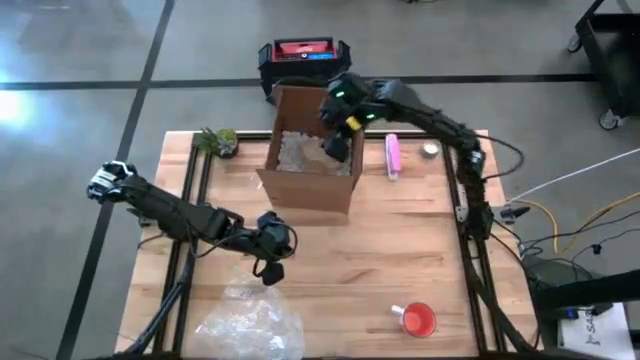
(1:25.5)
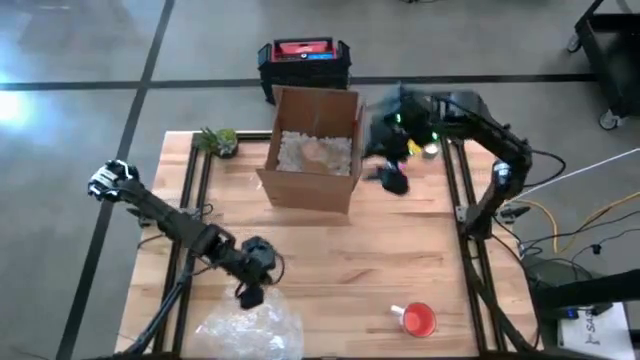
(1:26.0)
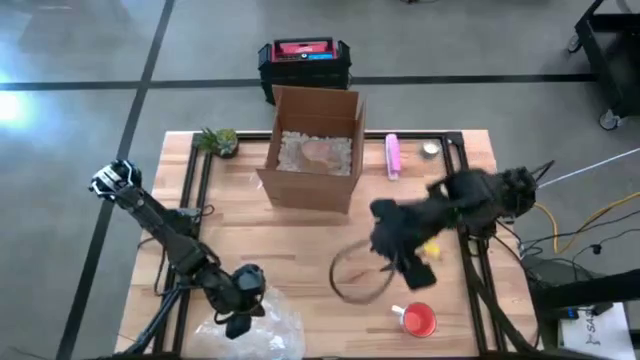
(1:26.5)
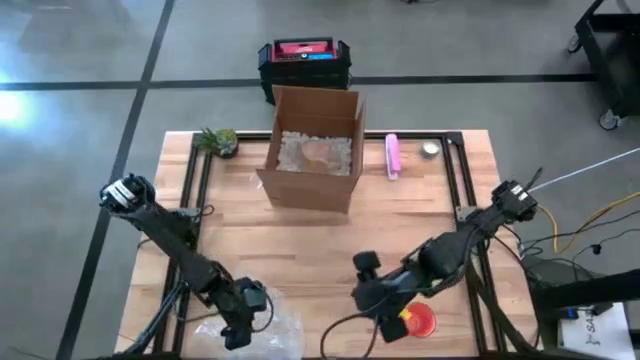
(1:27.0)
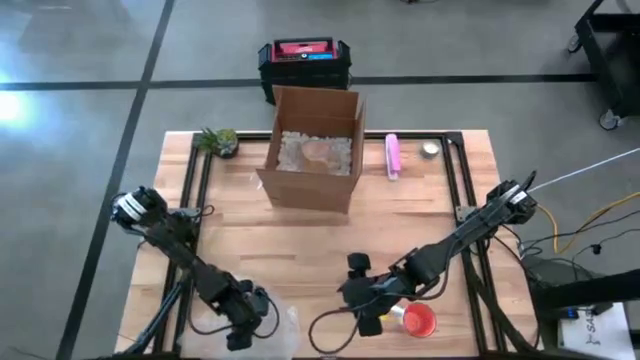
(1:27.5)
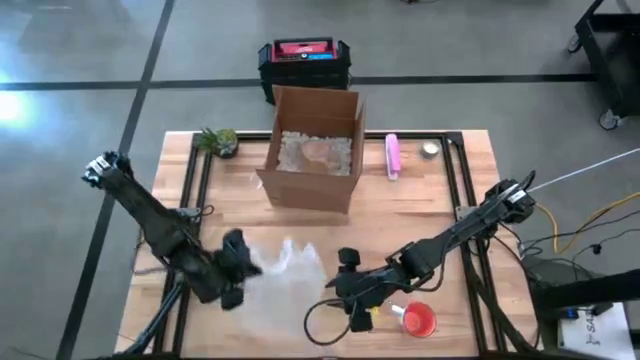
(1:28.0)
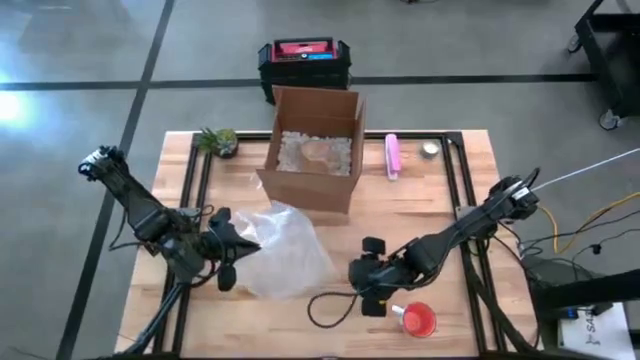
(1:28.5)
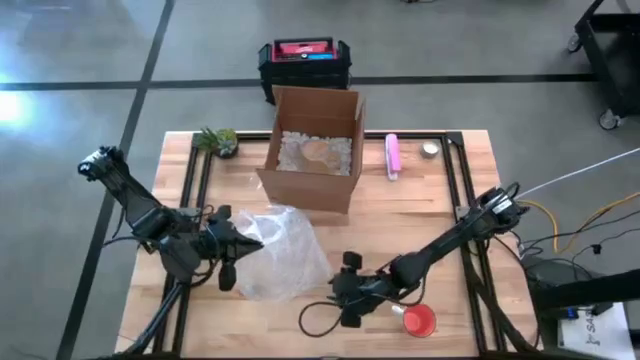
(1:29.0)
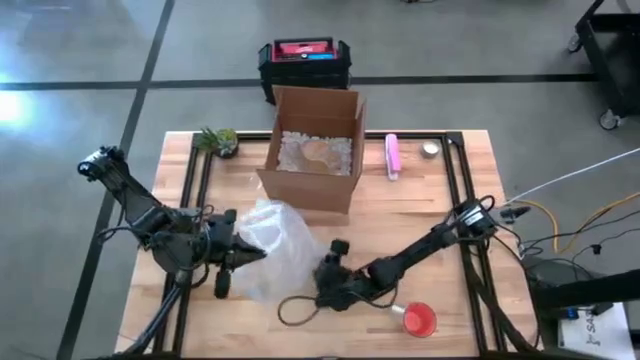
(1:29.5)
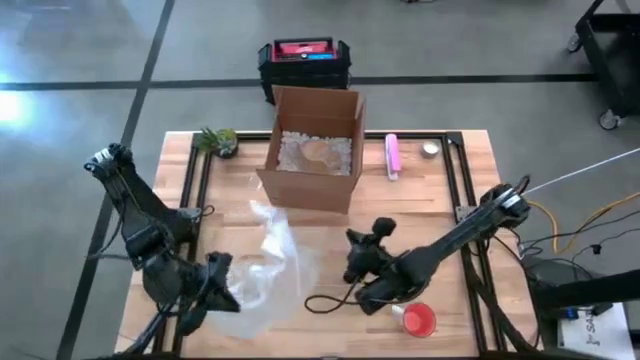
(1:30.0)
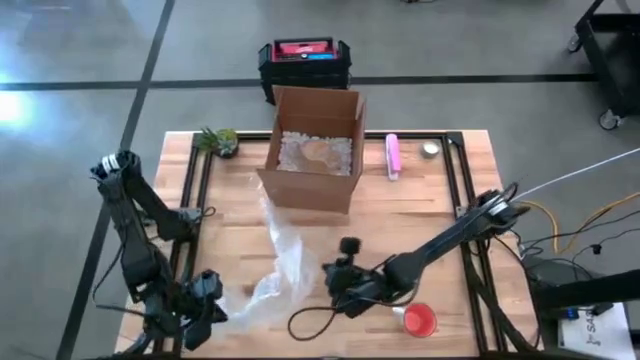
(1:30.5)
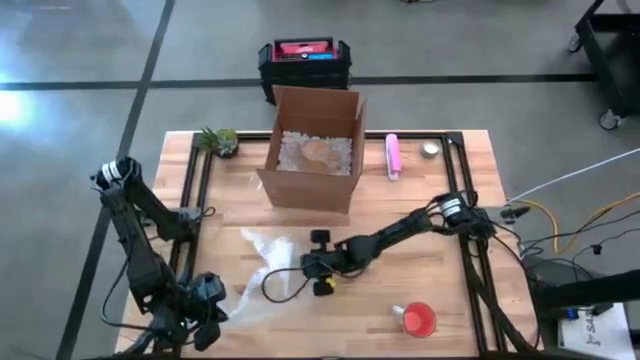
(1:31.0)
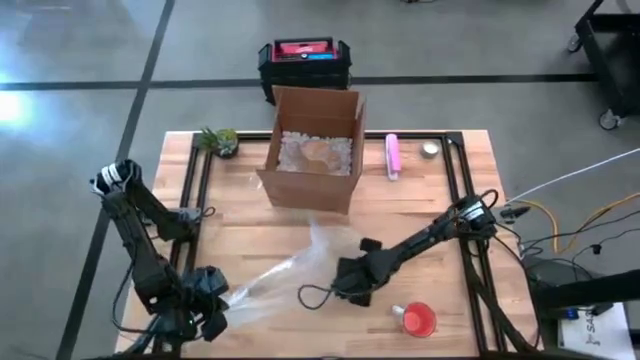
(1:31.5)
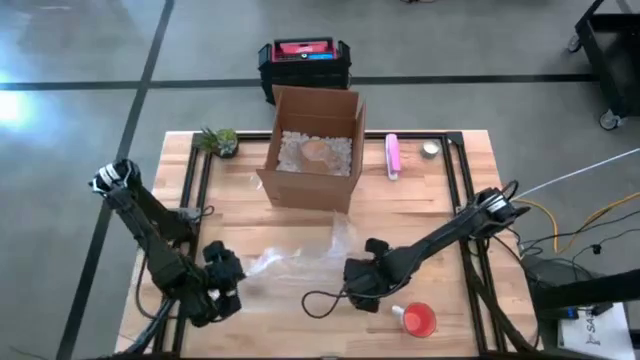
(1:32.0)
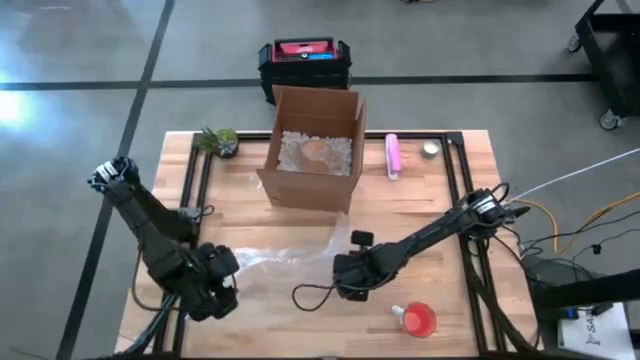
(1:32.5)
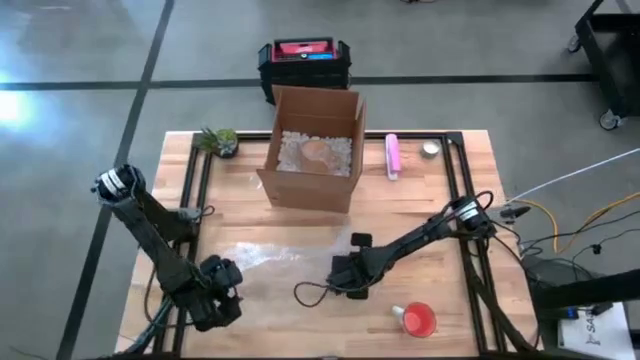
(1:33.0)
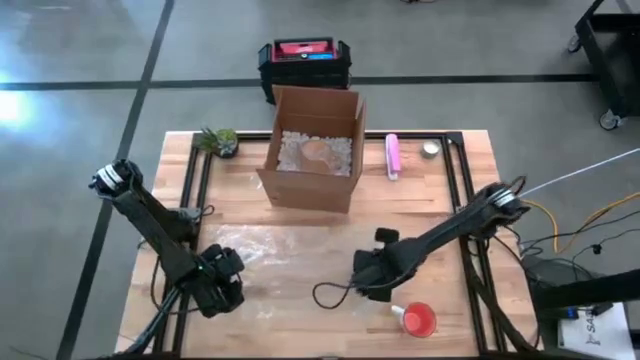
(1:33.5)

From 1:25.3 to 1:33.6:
Task: wrap mug
Prepare the transparent bubble wrap

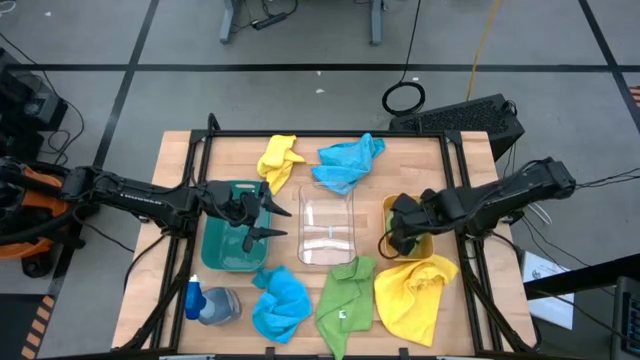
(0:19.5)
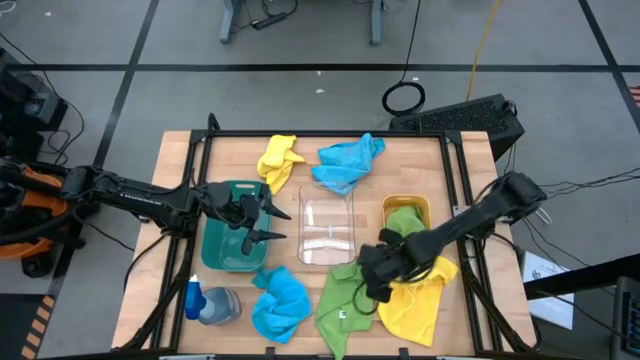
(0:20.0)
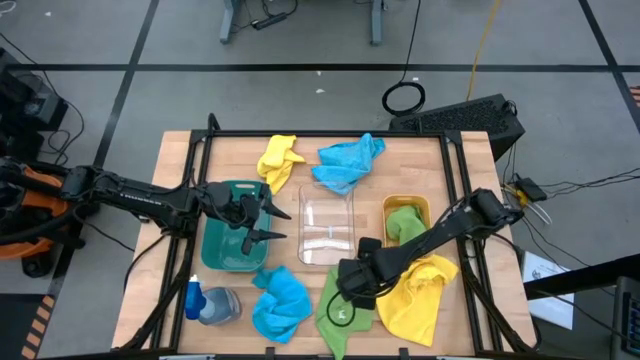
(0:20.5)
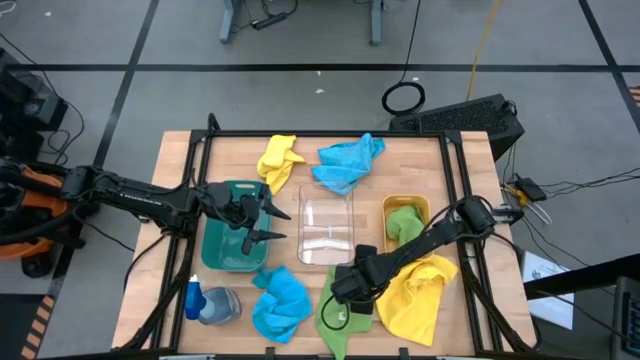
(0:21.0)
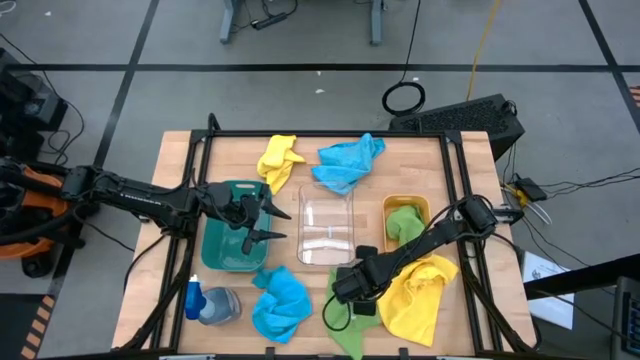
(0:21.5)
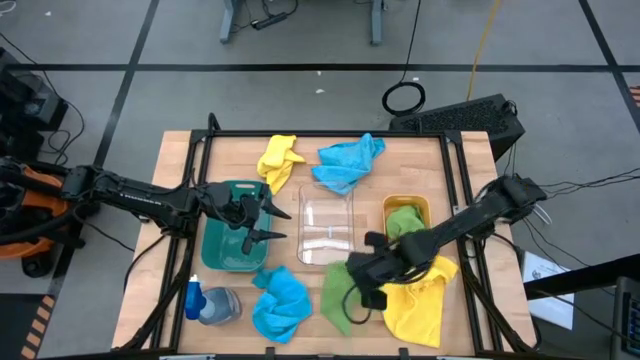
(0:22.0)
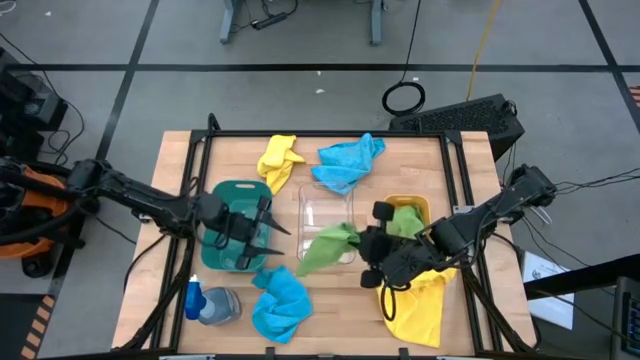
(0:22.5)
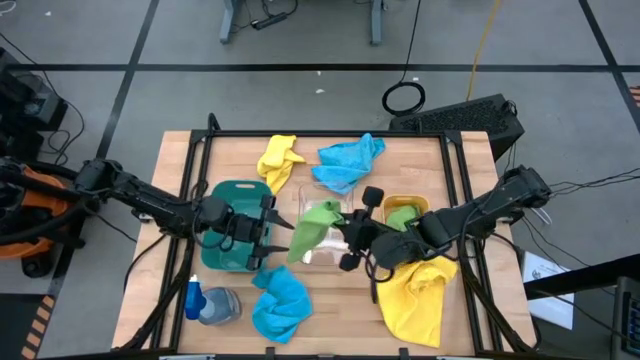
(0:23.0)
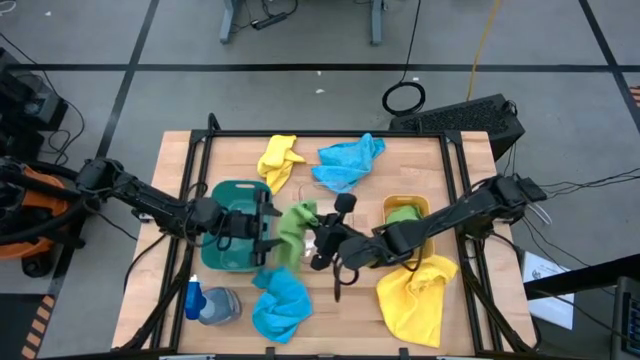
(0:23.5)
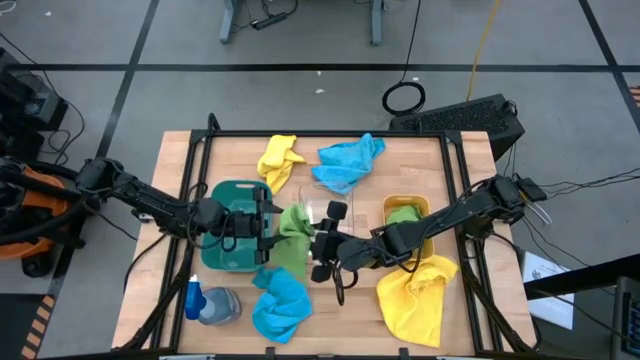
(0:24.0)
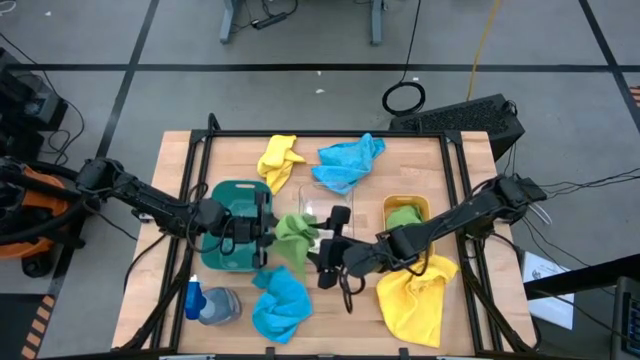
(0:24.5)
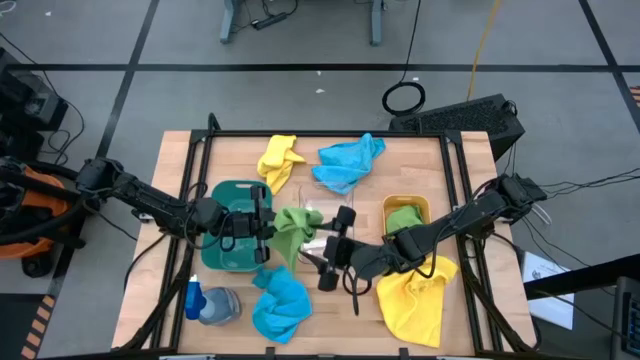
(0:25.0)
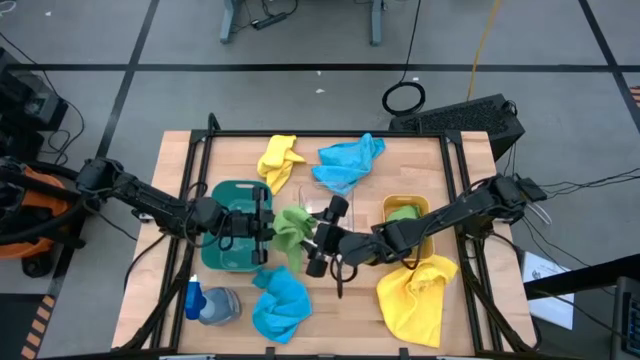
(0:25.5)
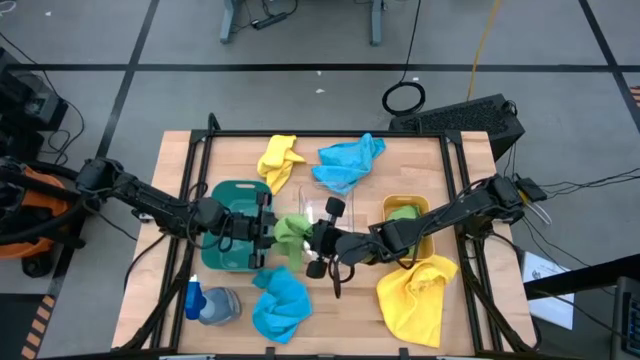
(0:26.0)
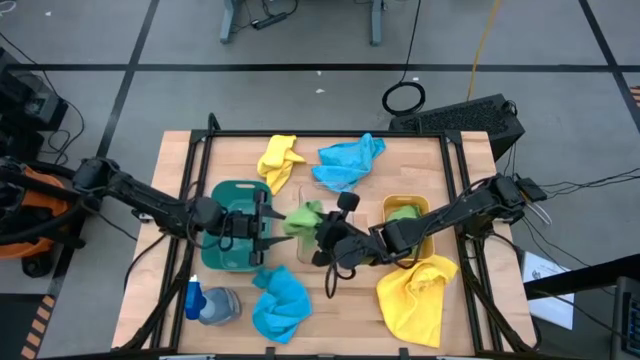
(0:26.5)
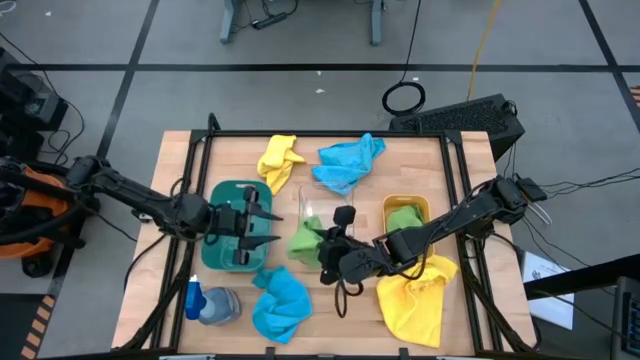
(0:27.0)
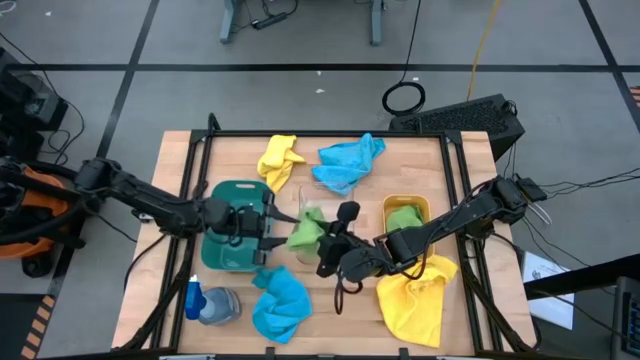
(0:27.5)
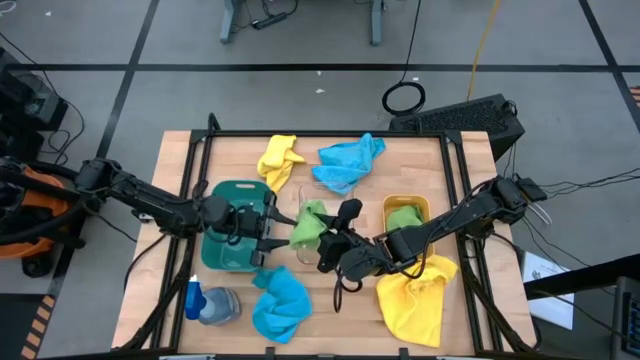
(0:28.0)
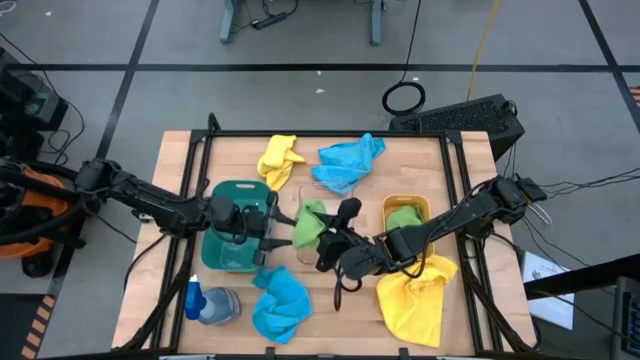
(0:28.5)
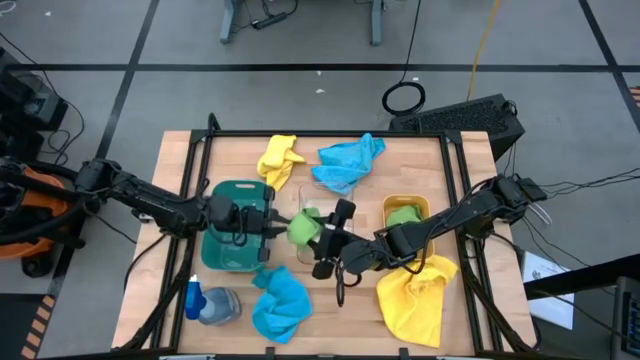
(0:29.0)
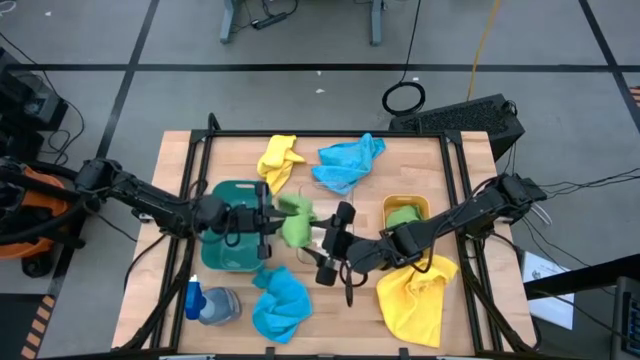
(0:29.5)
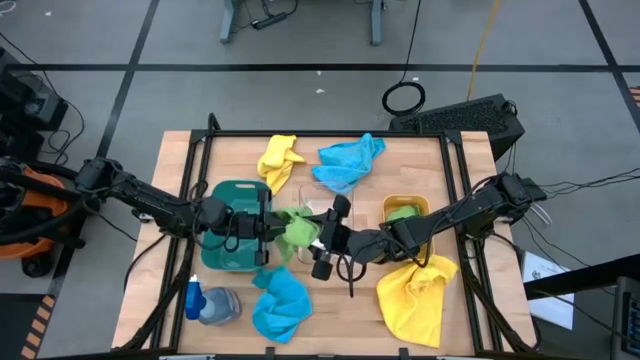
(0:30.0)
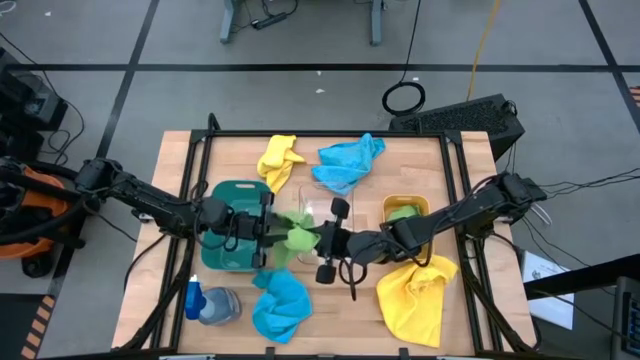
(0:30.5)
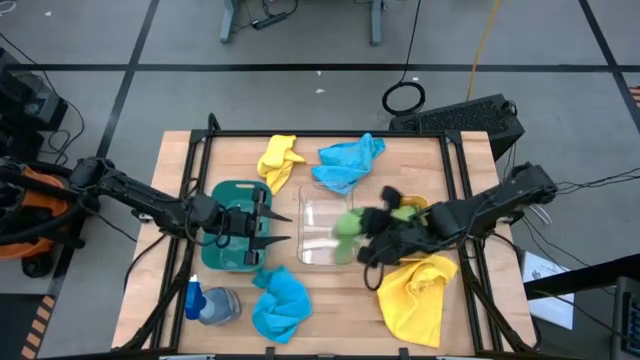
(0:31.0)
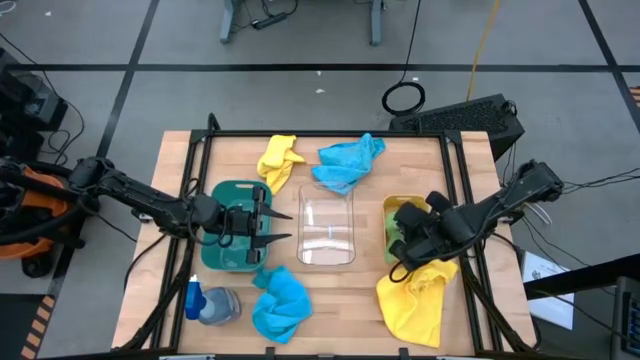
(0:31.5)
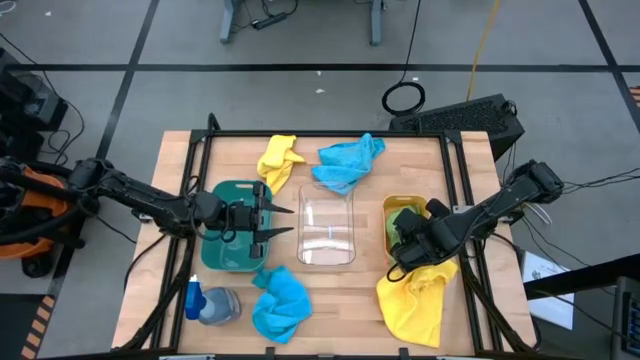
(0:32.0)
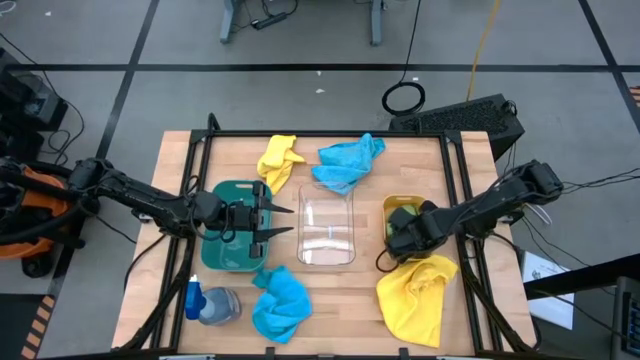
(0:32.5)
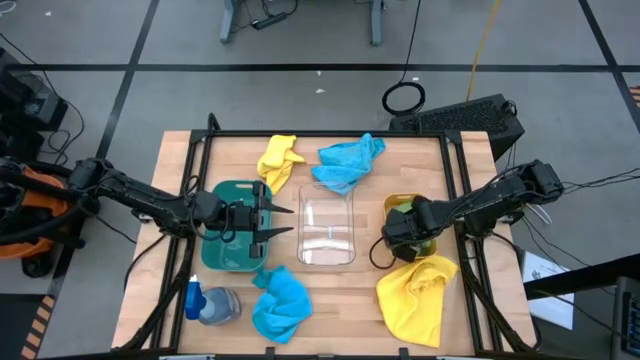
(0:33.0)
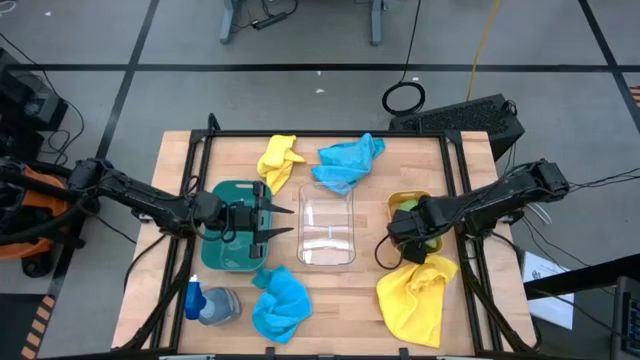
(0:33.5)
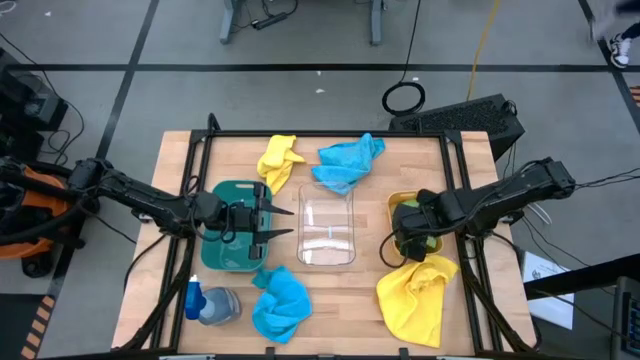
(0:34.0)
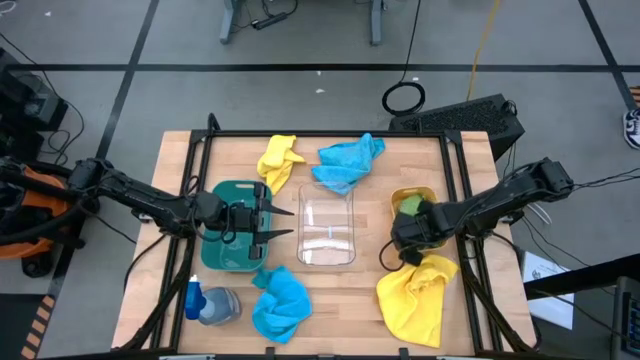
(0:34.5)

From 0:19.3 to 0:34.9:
Task: Sort microfiber towel by color & place in baskets
Put the green microfiber towel into the yellow bin
